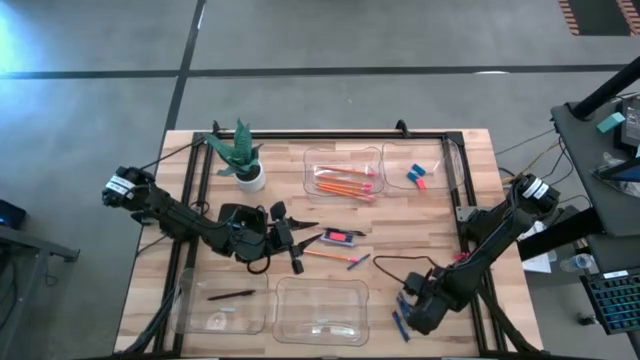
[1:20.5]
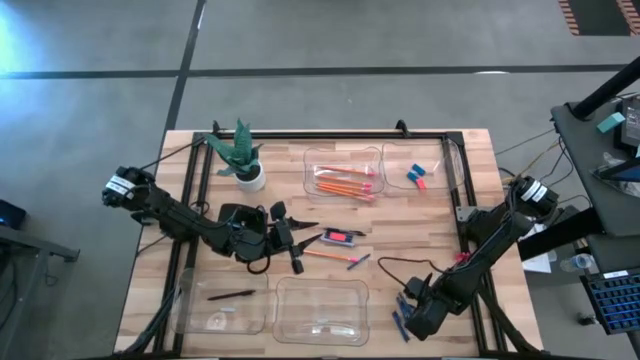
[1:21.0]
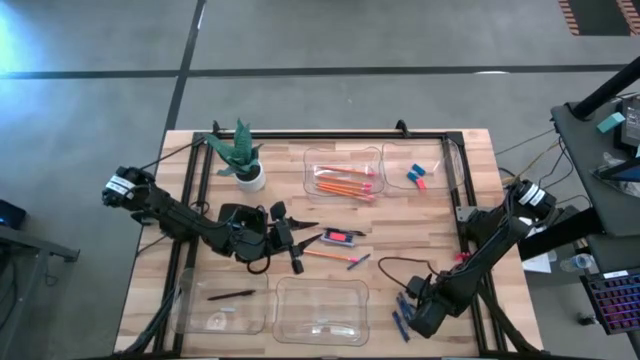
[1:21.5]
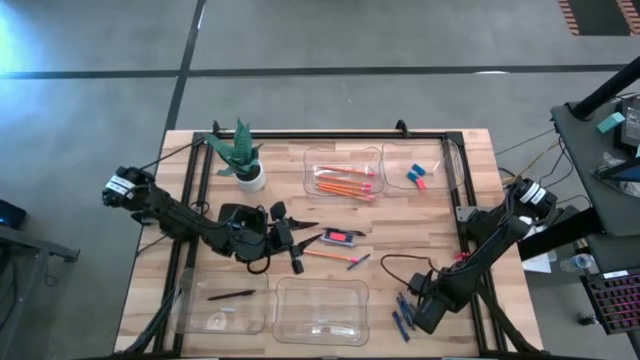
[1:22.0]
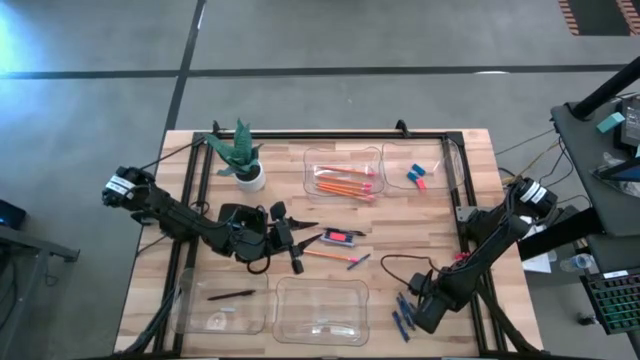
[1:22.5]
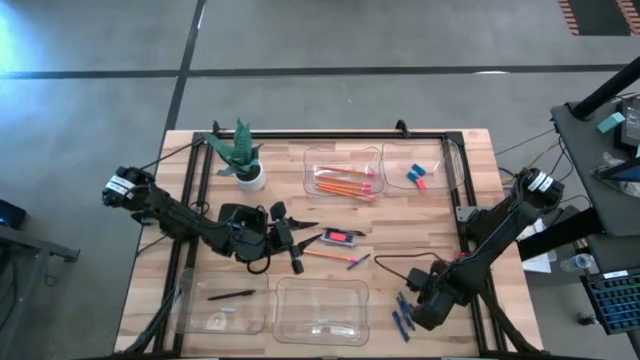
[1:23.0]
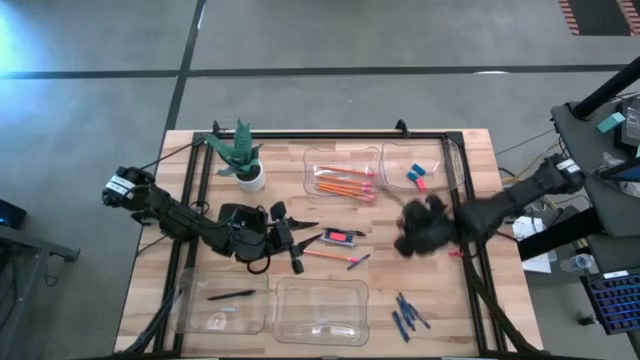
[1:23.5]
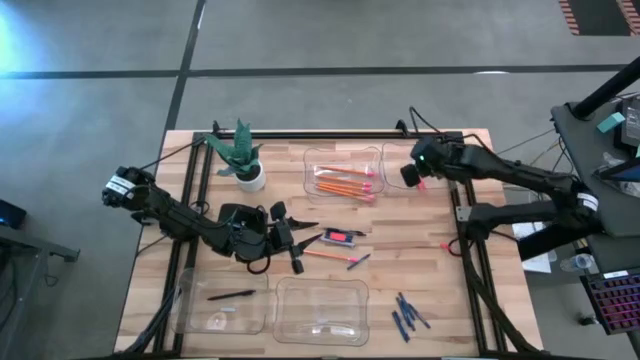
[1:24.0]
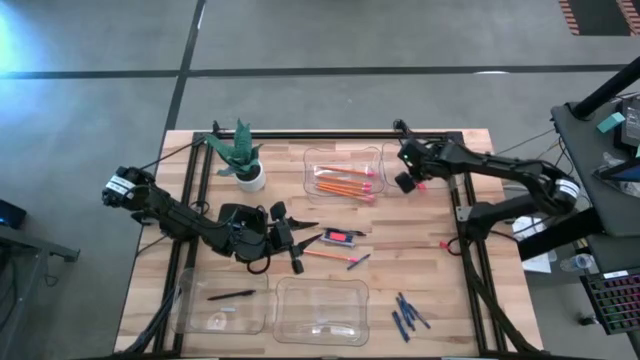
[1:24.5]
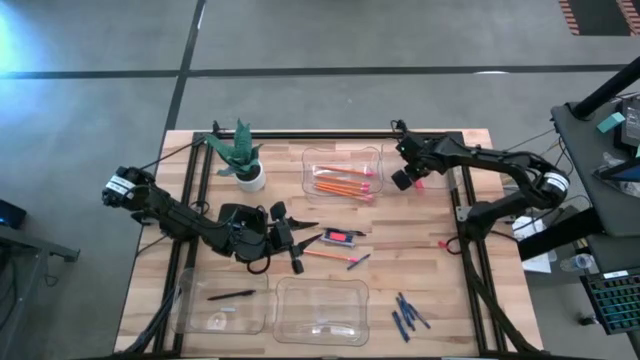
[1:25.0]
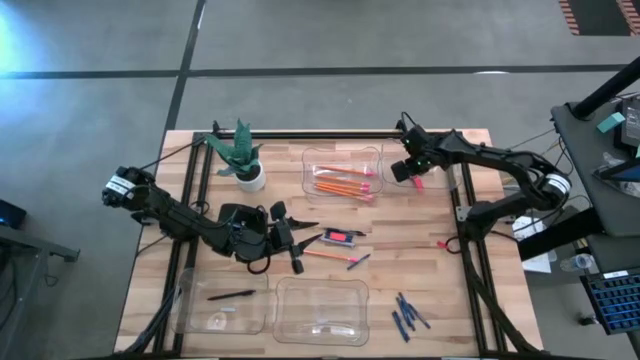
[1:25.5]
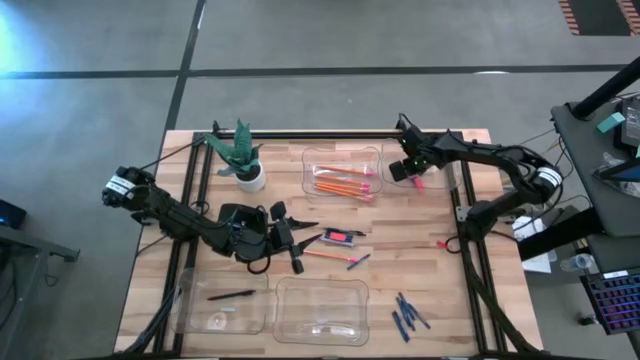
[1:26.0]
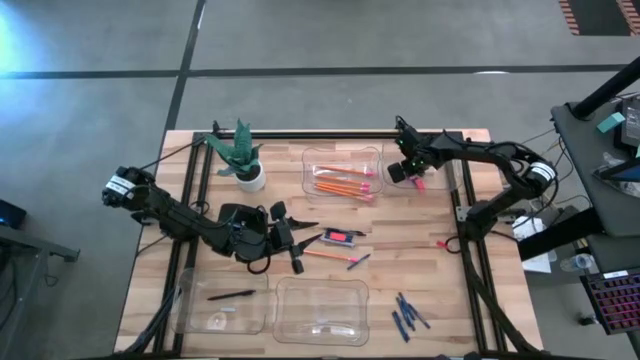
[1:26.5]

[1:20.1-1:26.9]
Task: Sort crayons/erasers/pens/pencils in bins
Put the pink eraser into the top right transparent bin

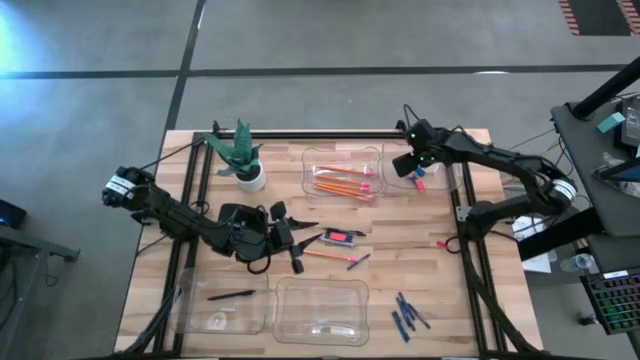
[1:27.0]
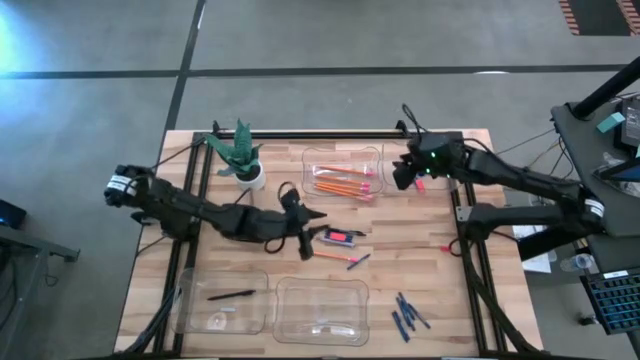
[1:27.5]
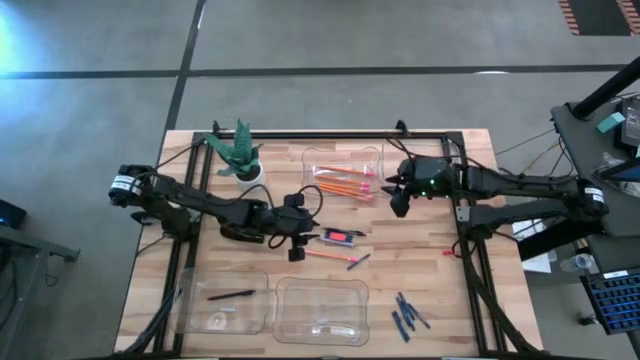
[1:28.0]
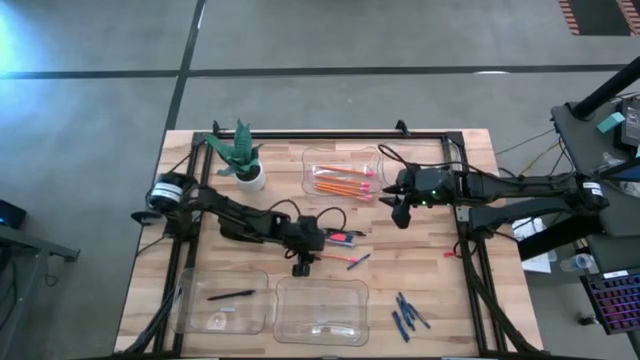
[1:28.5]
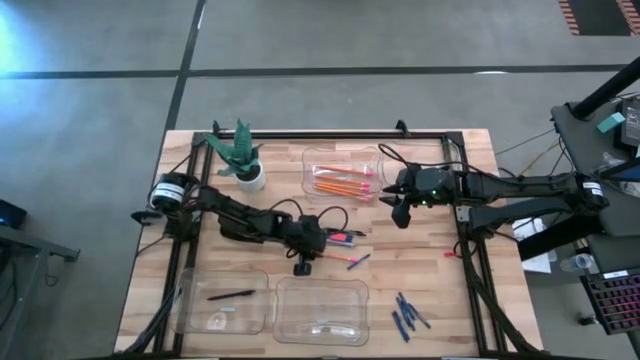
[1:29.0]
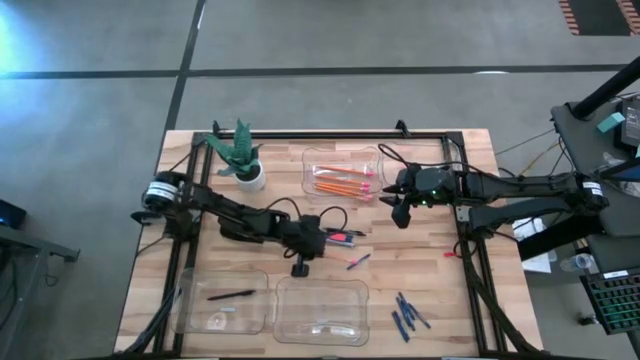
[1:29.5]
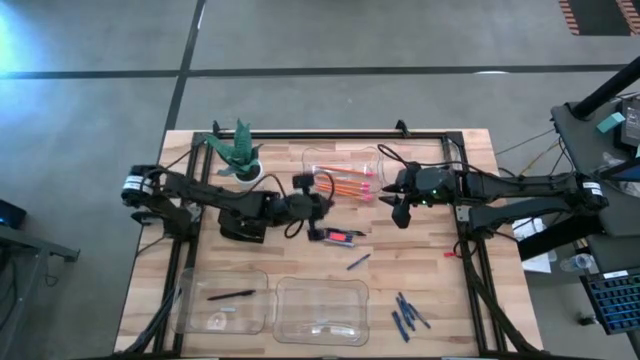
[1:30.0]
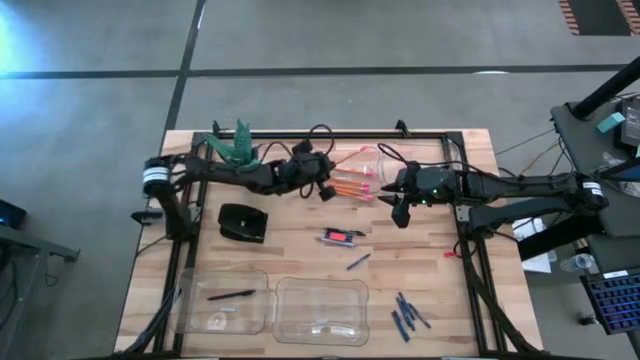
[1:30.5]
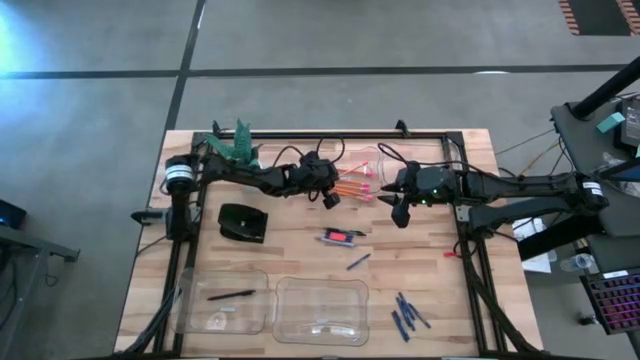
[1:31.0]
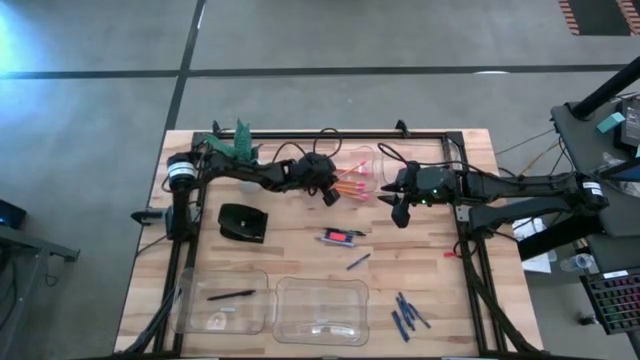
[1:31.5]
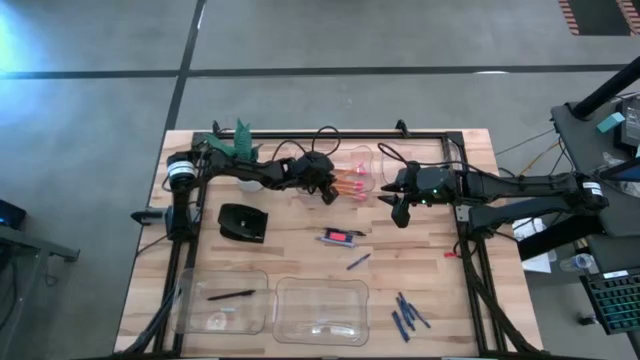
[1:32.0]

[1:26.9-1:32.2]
Put the yellow pencil into the top left transparent bin

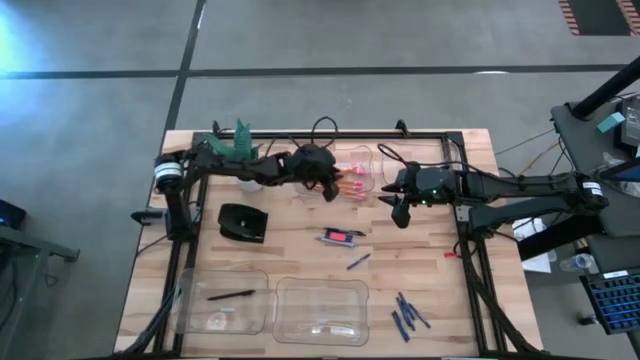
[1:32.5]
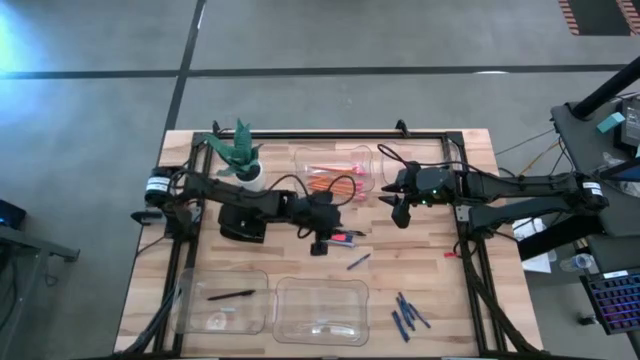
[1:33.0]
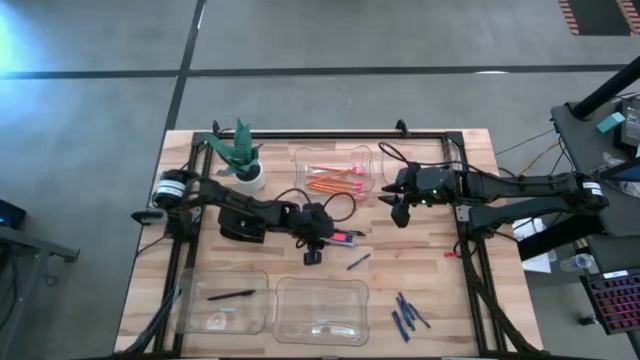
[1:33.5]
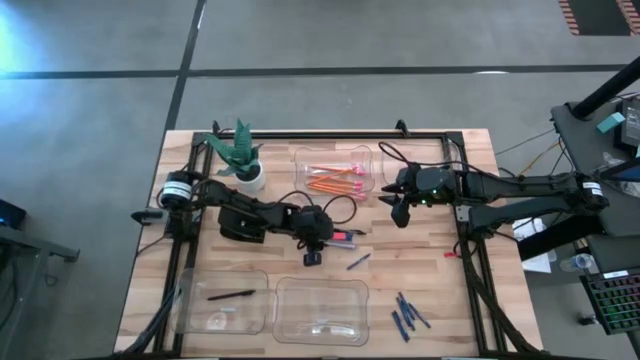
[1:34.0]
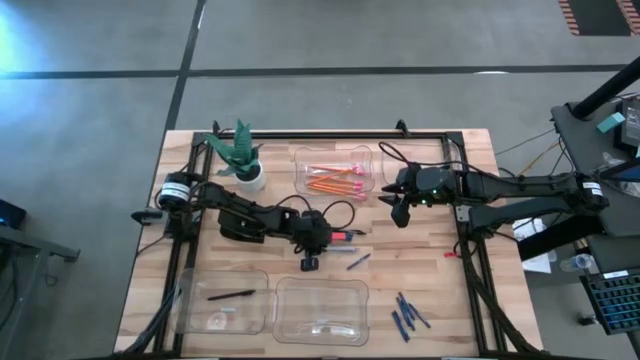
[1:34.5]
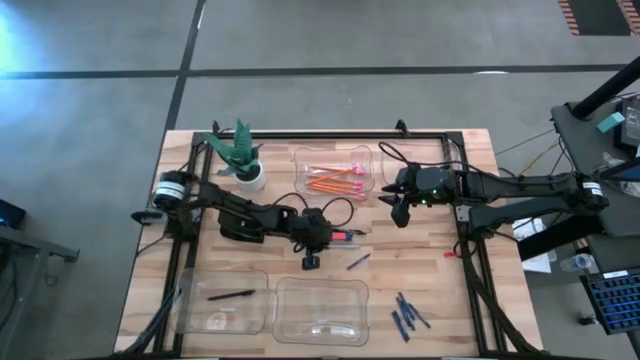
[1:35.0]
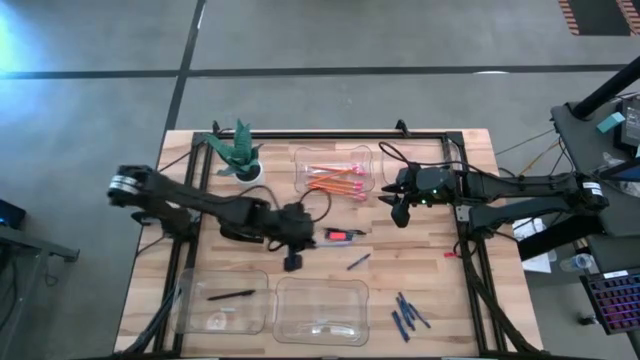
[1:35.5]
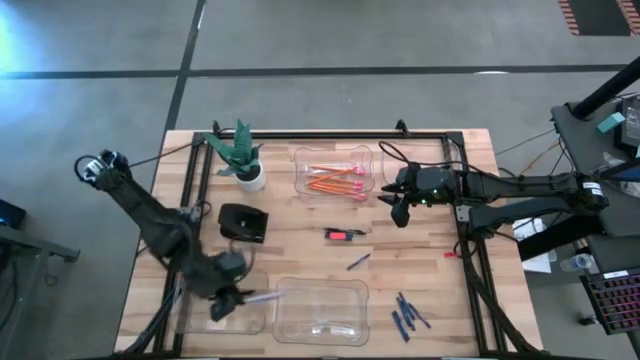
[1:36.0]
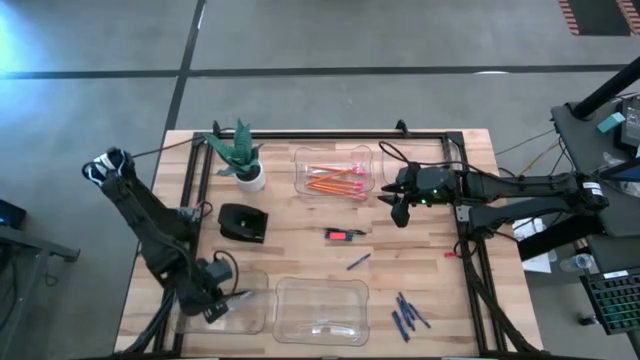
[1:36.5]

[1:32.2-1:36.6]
Put the gray pen into the bottom left transparent bin

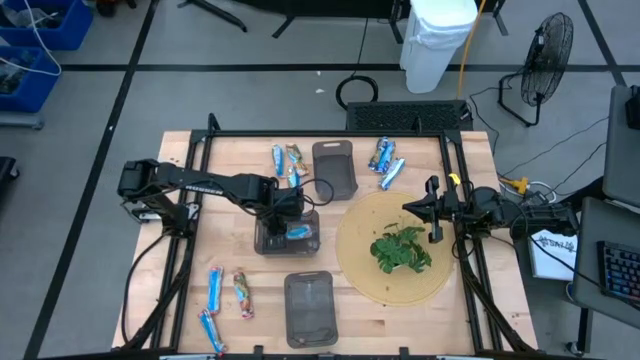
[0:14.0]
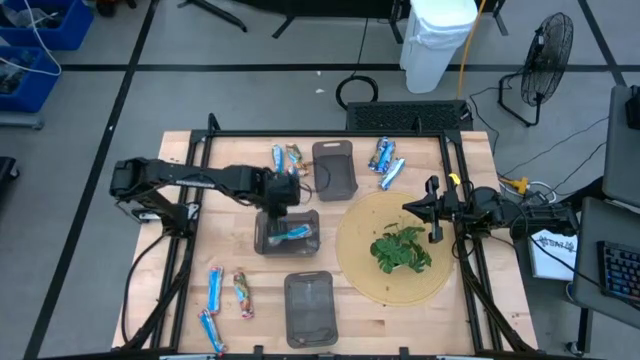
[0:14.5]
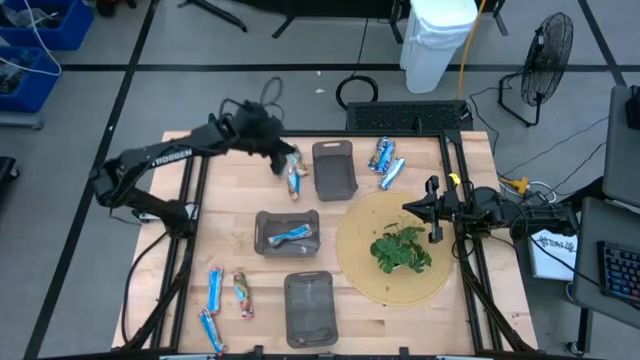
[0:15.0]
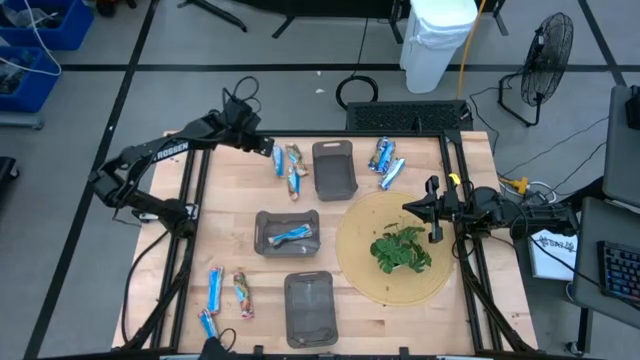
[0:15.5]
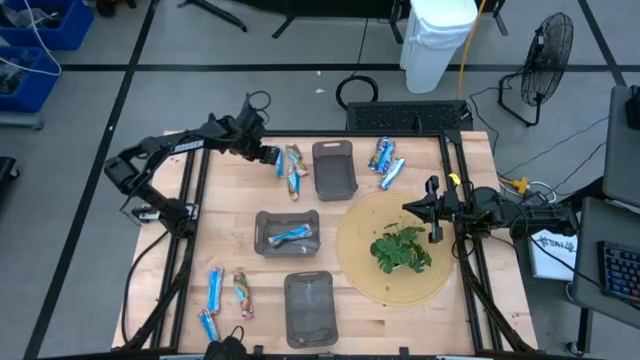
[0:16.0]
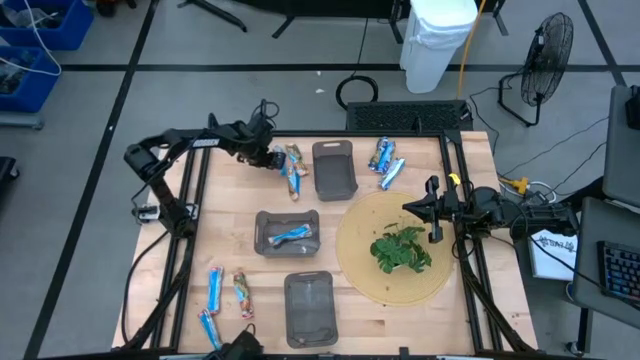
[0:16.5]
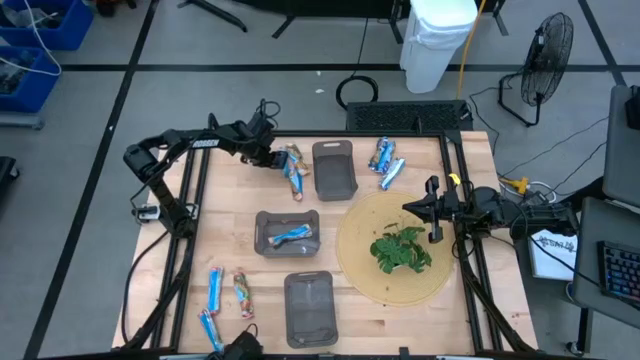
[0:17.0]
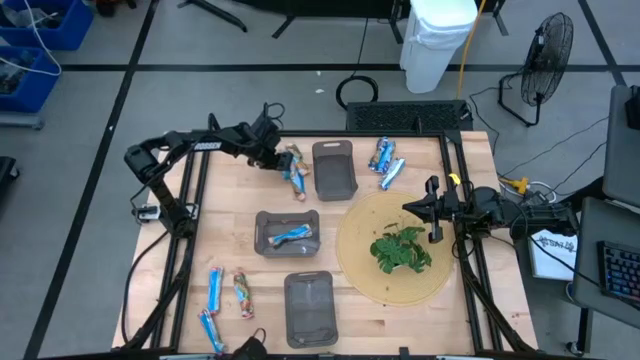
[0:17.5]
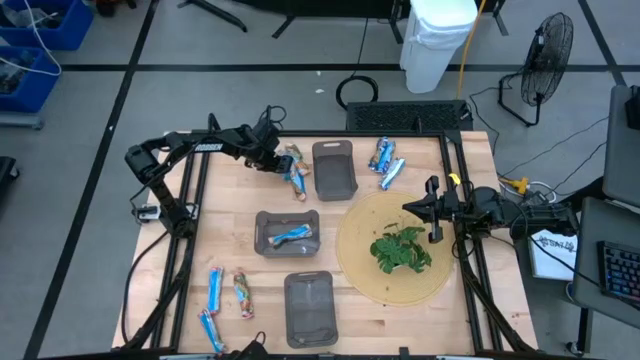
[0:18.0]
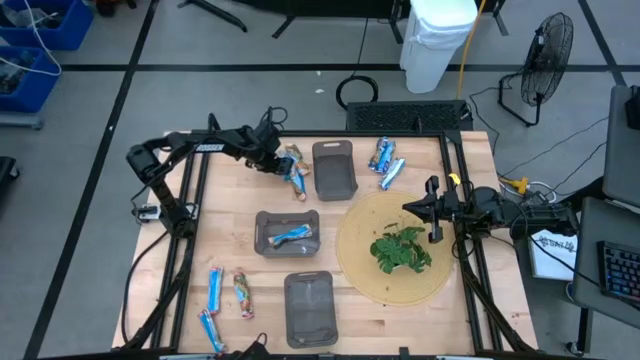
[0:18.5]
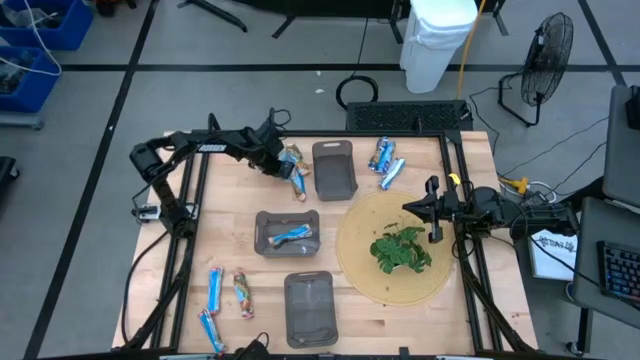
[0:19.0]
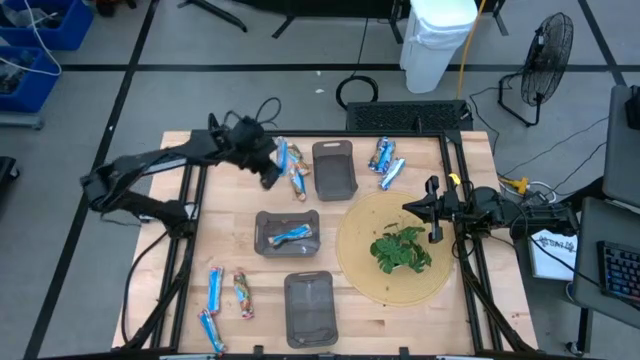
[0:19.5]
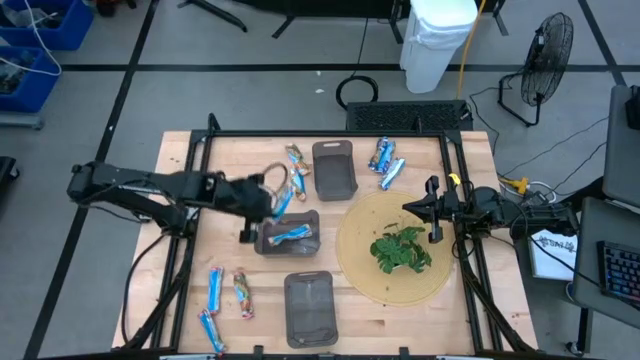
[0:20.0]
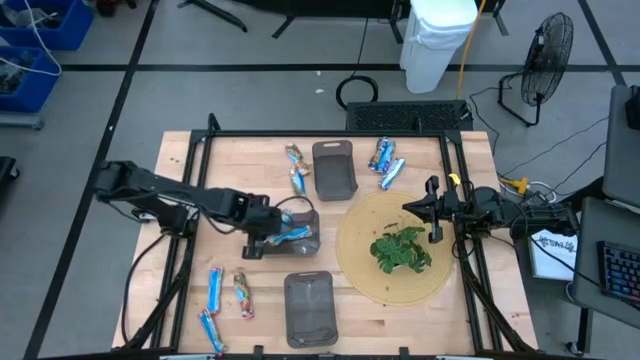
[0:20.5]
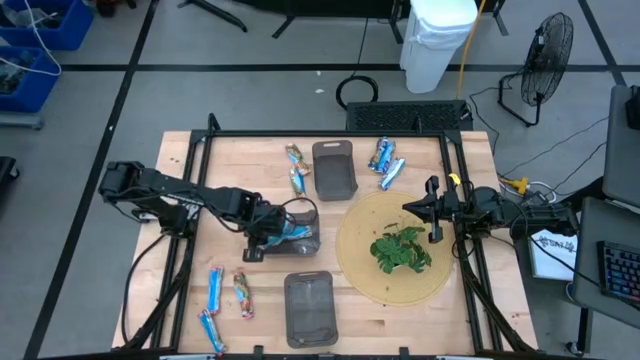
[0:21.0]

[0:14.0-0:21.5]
Task: Pick and place Granola Bars by type
Put the yellow granola bar into the middle black bin
